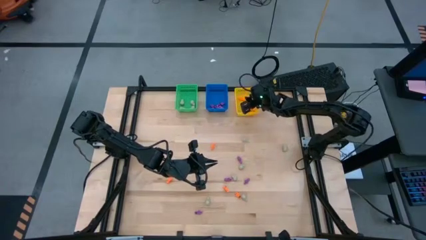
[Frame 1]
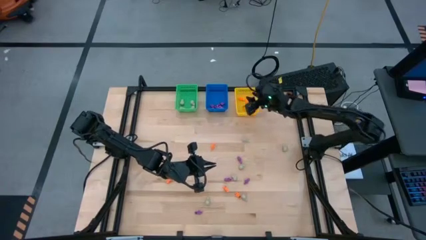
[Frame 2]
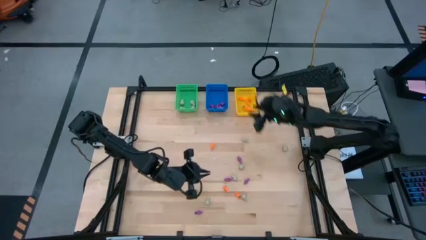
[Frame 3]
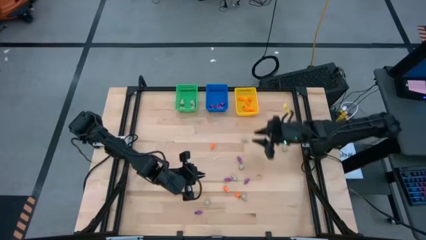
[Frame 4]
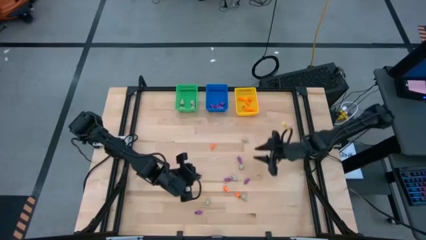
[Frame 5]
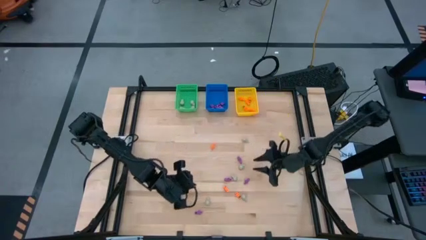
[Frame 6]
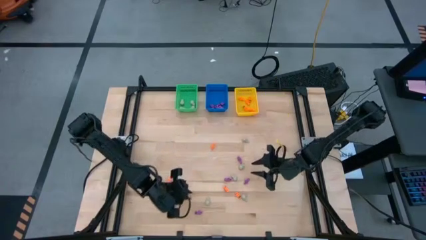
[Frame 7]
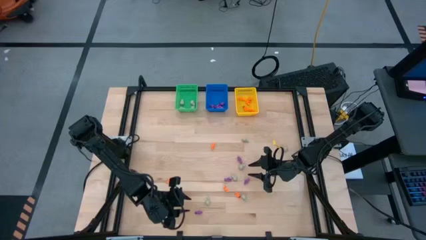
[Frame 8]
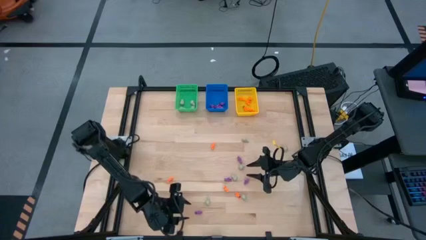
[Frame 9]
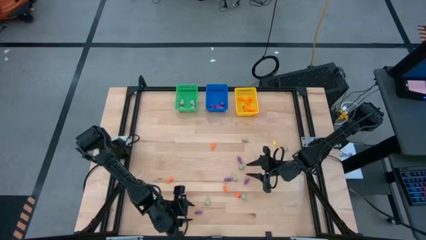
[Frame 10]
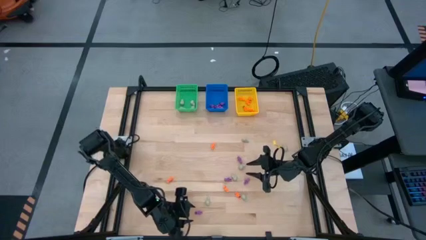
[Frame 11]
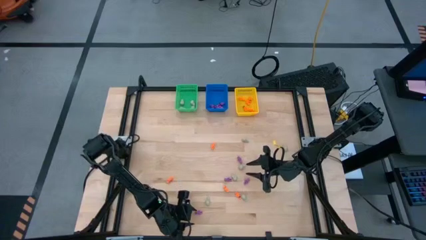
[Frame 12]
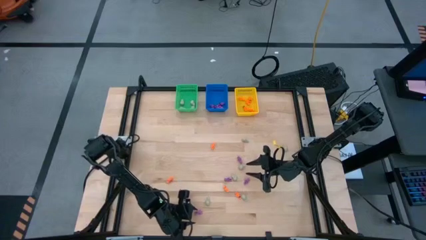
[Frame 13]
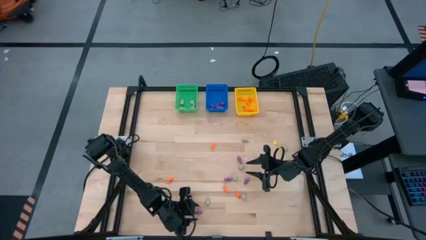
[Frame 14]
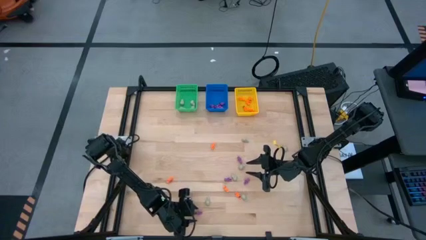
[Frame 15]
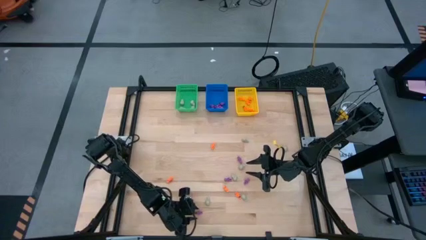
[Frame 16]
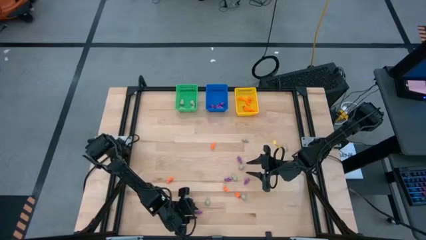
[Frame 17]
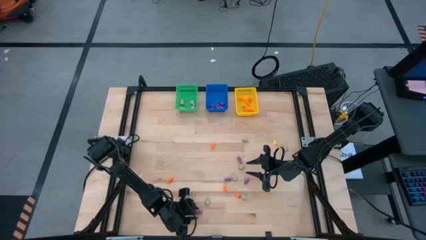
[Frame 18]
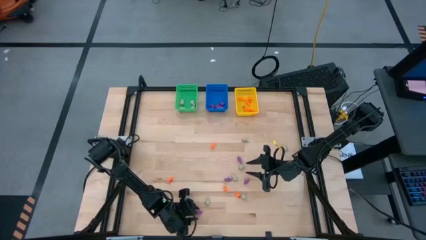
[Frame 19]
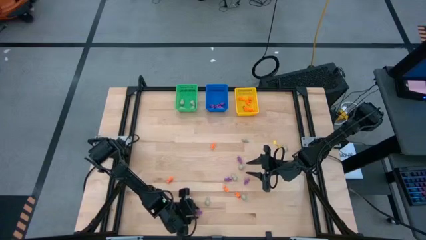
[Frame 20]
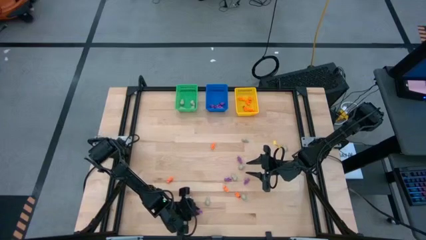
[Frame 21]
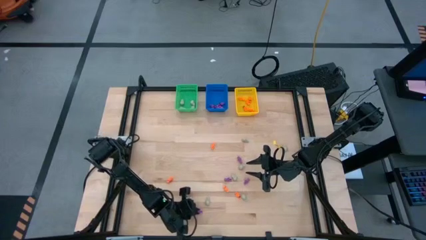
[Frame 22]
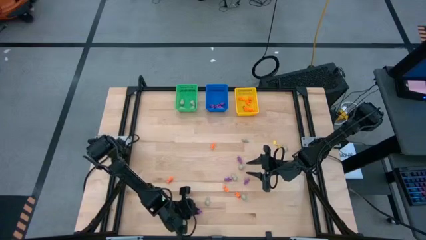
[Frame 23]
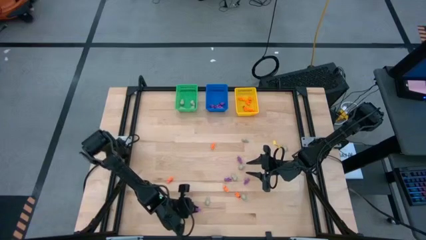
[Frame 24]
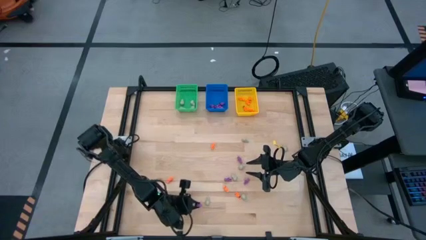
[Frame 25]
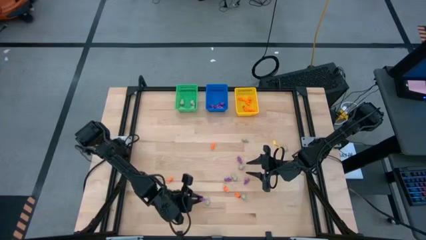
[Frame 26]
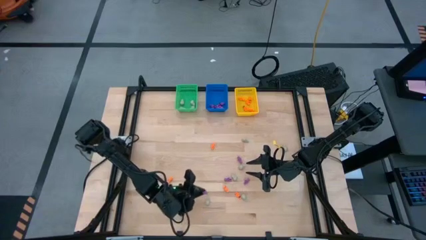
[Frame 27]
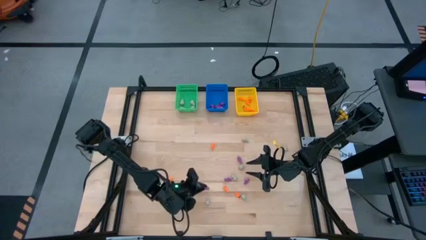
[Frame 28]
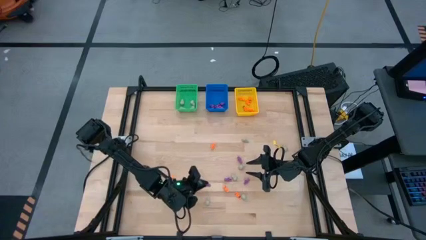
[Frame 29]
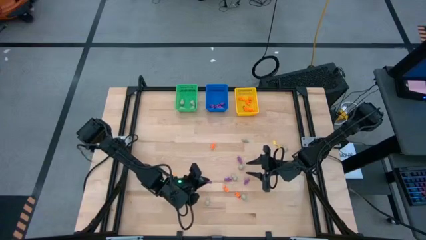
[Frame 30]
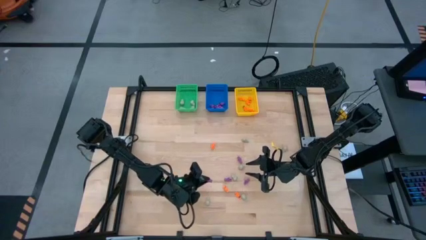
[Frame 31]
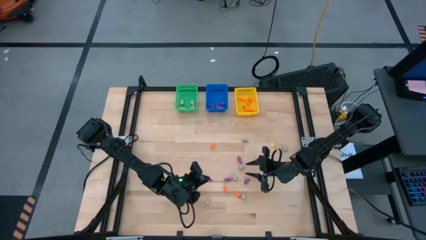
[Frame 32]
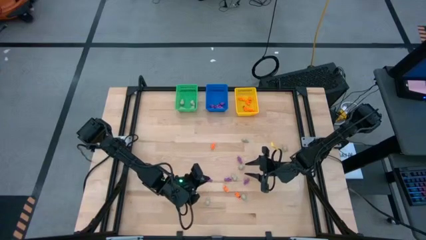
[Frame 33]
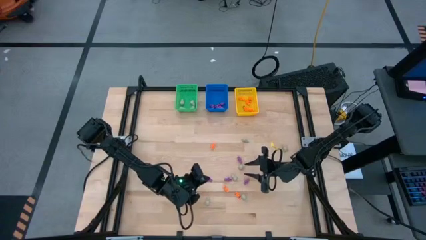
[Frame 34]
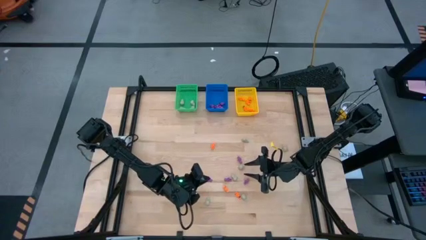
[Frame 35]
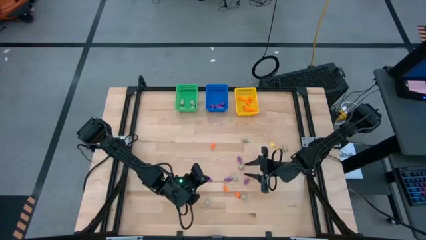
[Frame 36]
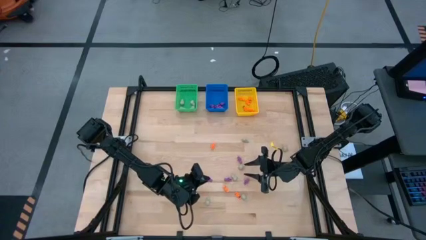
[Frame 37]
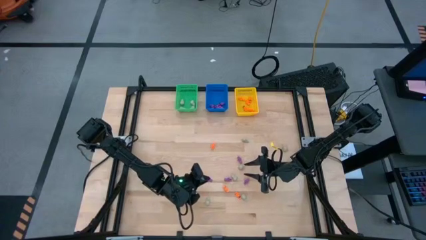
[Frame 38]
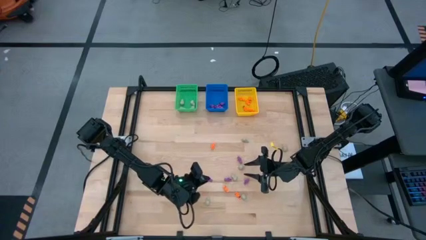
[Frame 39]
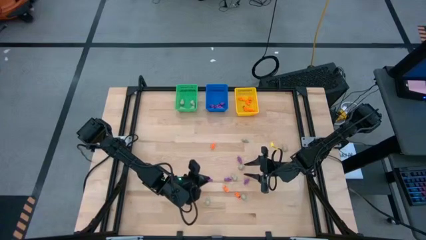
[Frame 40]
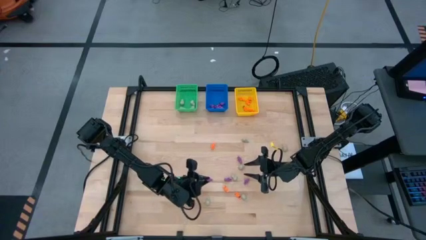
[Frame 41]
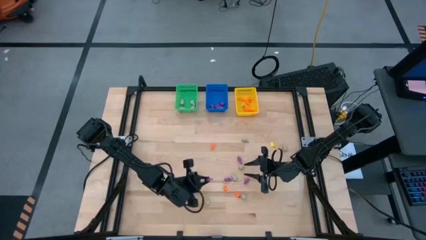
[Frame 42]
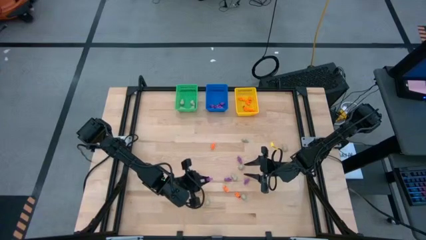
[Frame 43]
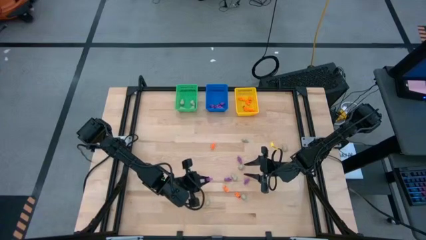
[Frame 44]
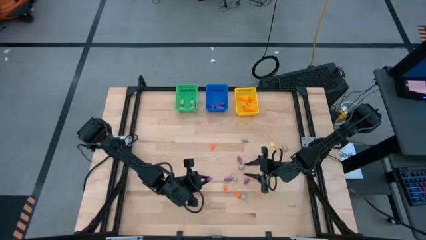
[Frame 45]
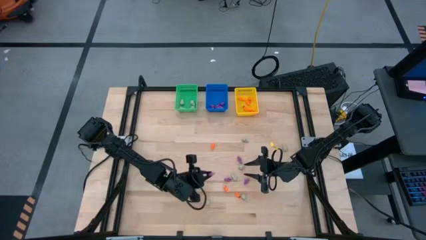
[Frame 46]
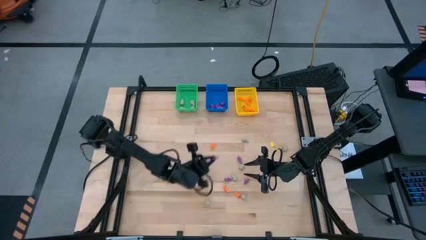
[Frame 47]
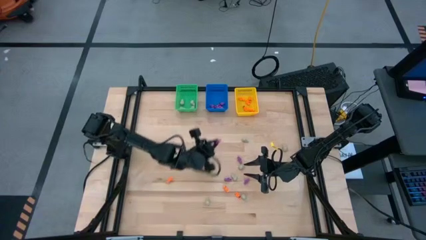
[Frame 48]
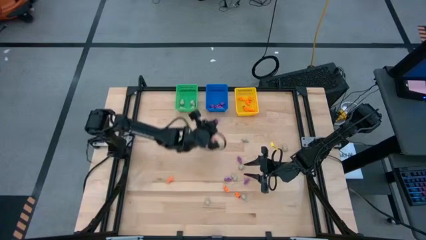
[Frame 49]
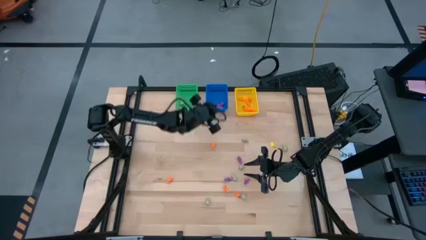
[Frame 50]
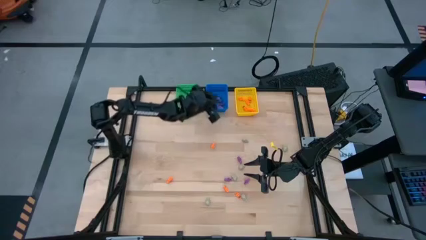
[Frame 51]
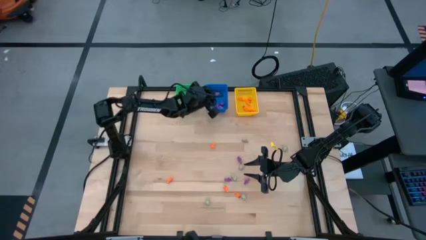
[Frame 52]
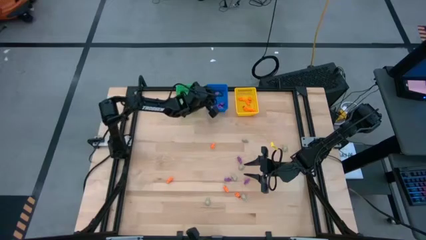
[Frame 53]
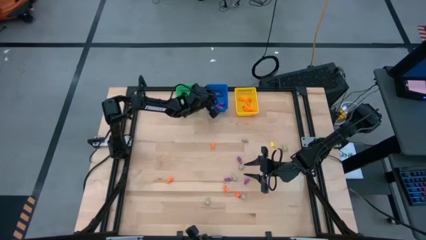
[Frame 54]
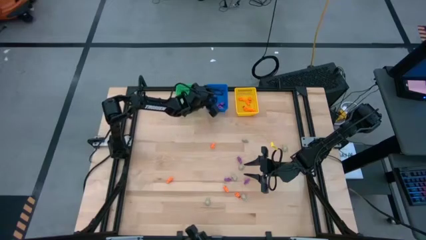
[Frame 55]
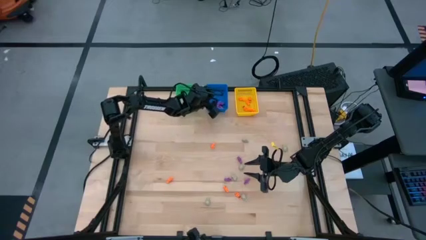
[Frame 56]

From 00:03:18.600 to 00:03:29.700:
Task: Sort Halloween decoration
Put the purple skeleton toy into the blue bin

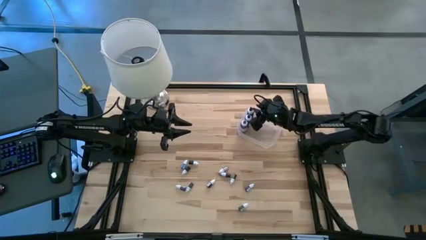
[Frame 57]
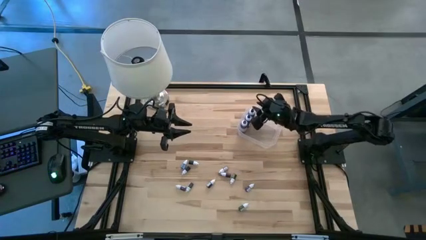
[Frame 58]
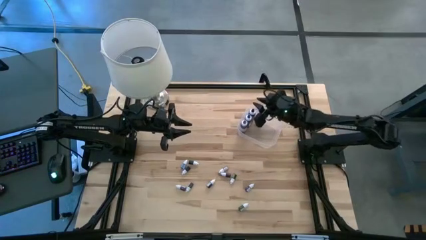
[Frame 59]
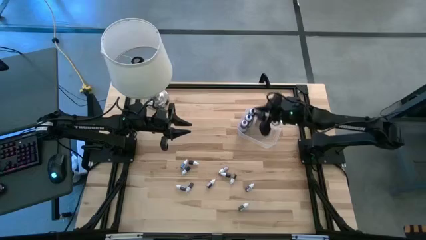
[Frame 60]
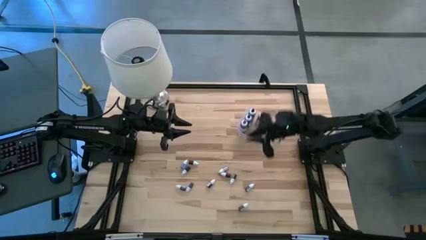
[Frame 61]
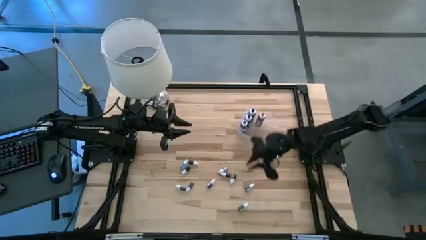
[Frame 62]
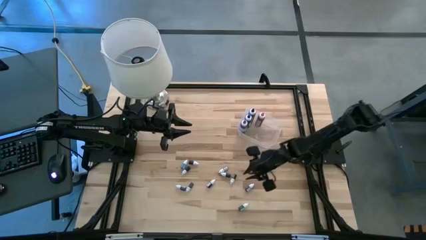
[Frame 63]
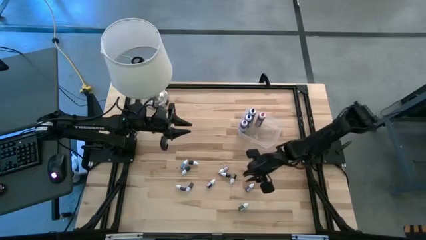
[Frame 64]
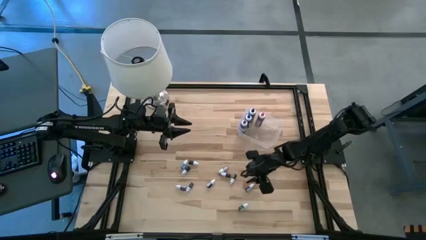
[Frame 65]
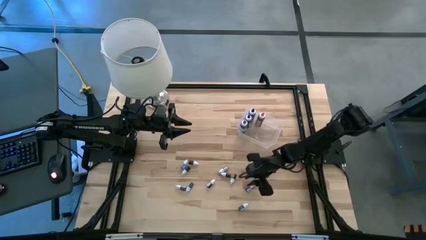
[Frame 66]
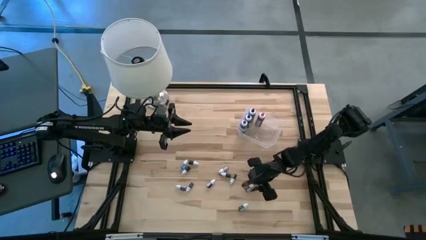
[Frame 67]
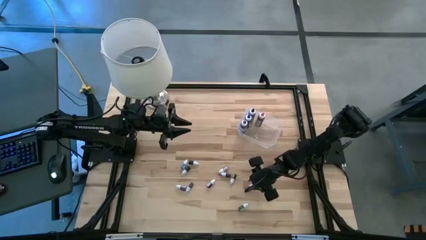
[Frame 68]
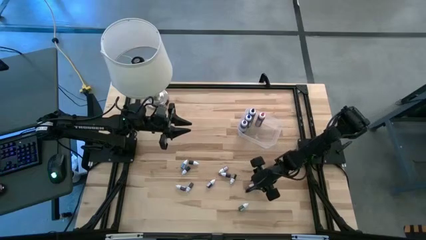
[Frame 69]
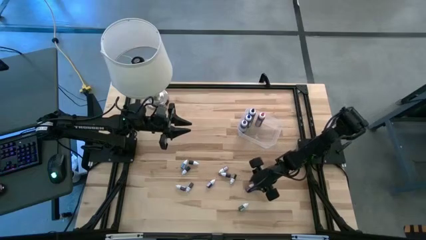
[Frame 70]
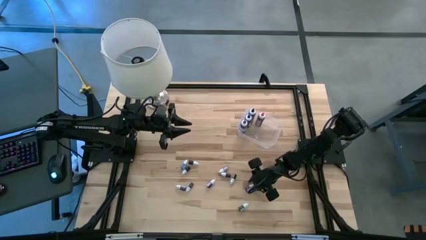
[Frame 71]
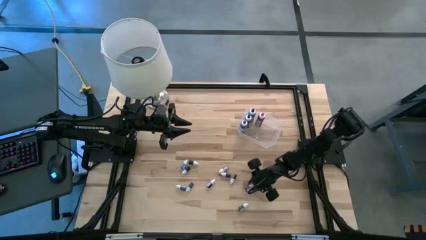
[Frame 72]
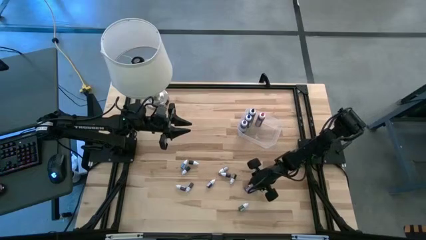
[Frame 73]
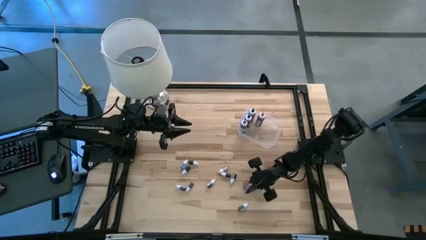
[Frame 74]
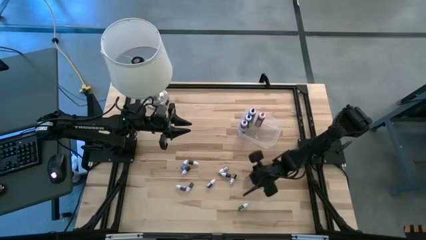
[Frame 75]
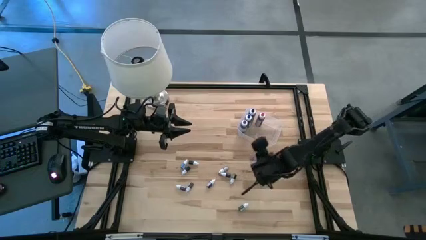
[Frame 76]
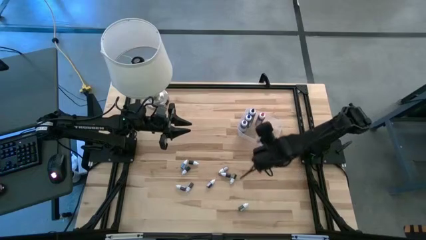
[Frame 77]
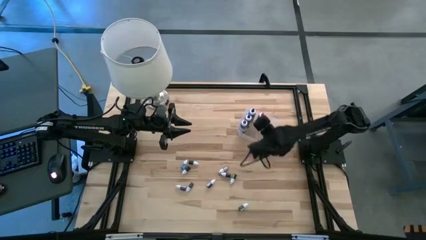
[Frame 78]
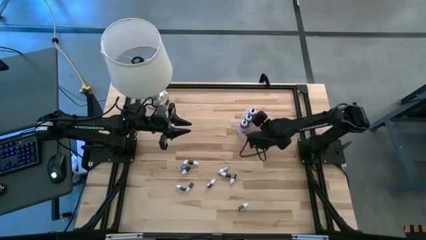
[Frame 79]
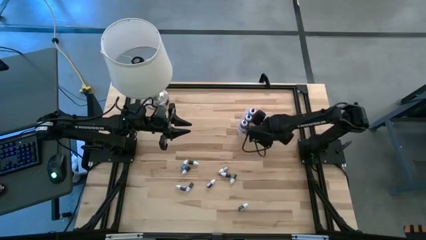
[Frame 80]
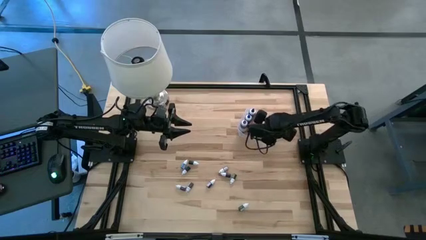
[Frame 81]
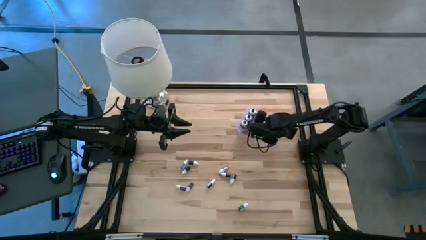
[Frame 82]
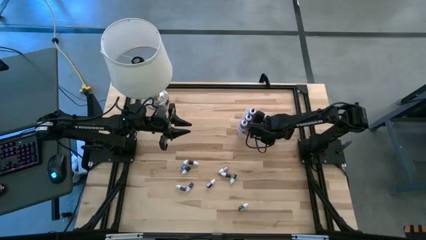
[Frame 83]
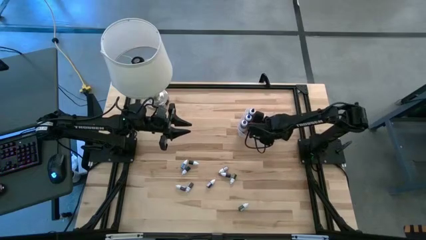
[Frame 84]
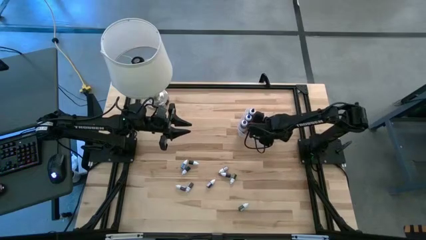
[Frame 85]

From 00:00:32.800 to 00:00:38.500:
Task: Pick & Place food coloring
Put the small right violet food coloring bottle into the transparent bin
